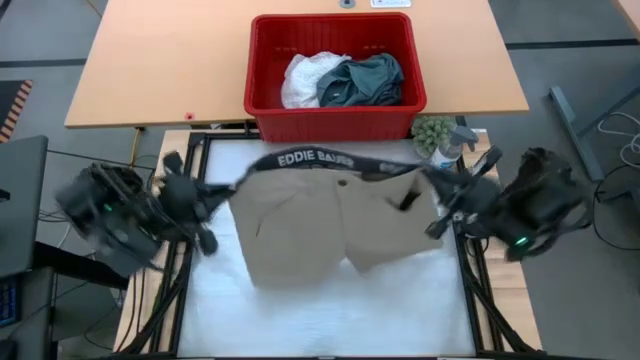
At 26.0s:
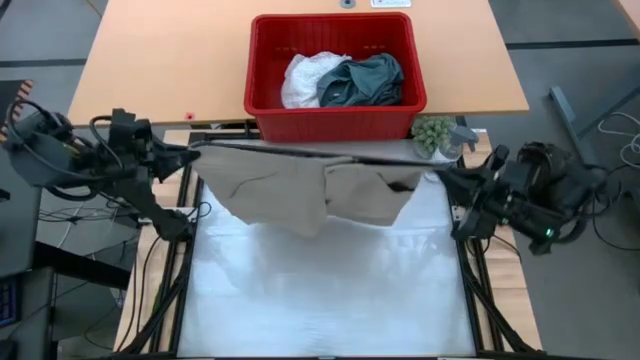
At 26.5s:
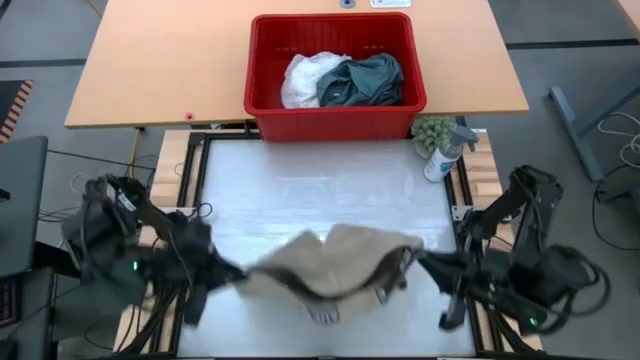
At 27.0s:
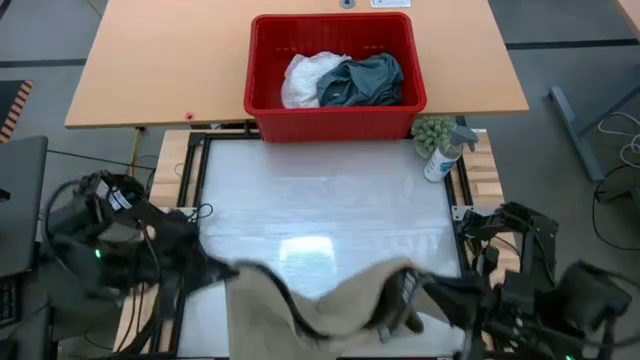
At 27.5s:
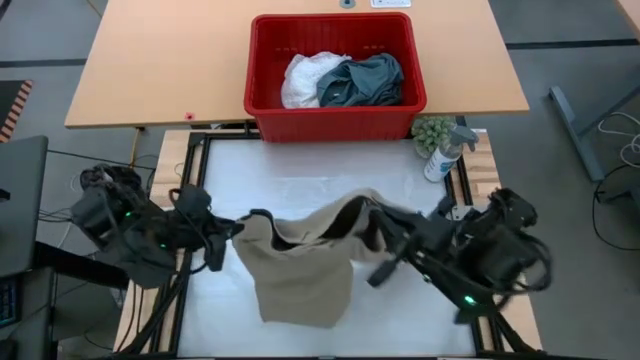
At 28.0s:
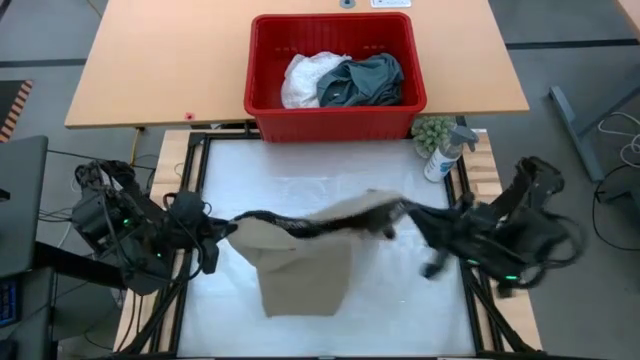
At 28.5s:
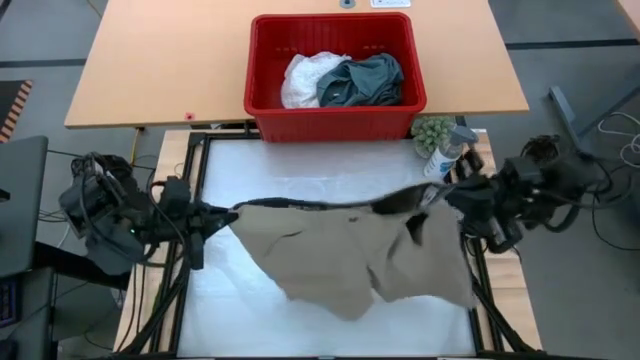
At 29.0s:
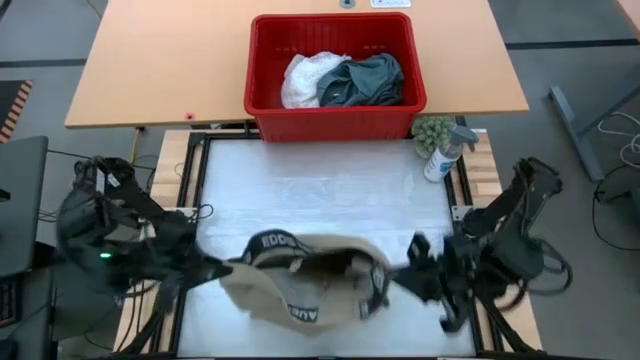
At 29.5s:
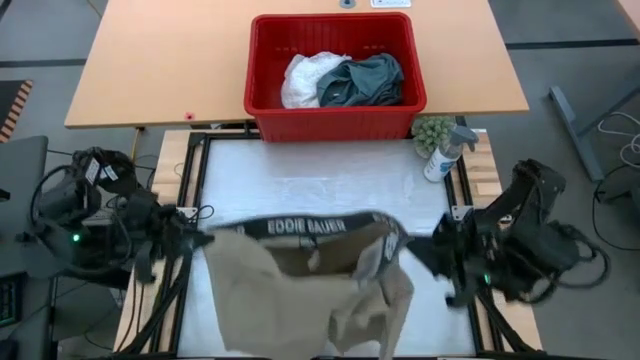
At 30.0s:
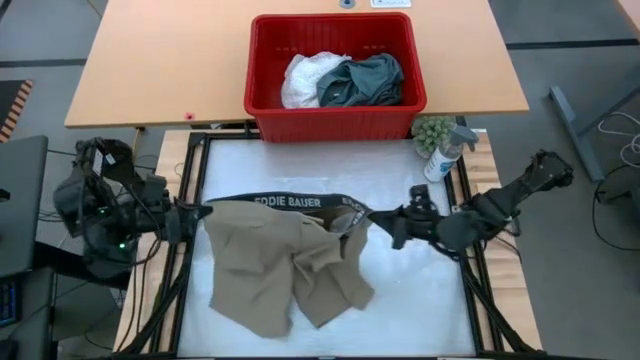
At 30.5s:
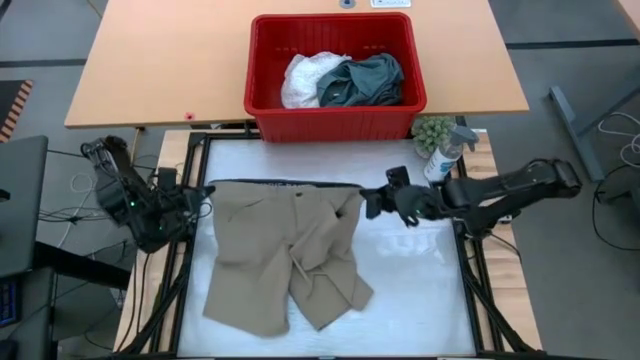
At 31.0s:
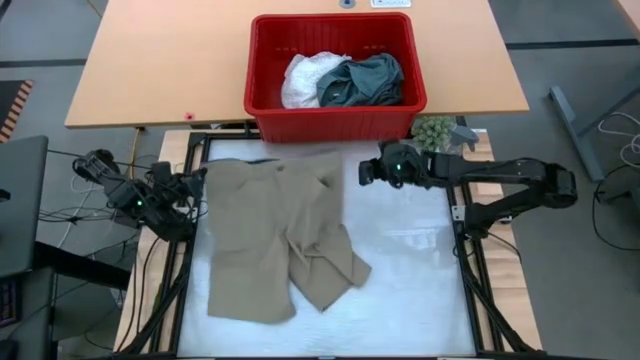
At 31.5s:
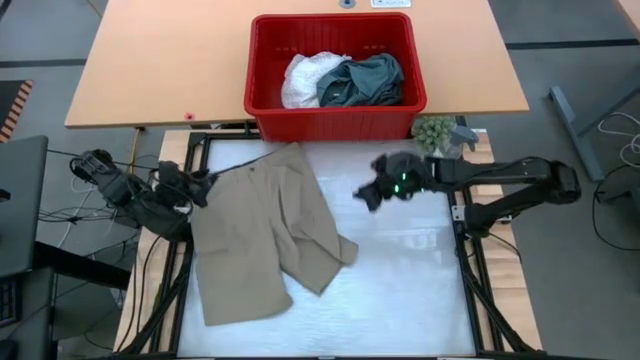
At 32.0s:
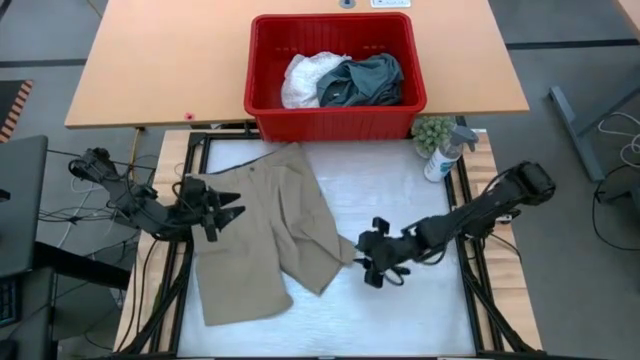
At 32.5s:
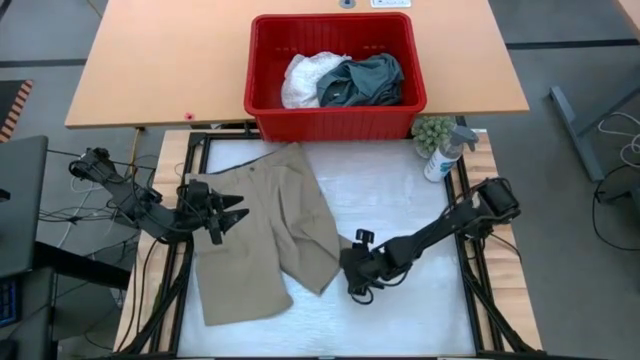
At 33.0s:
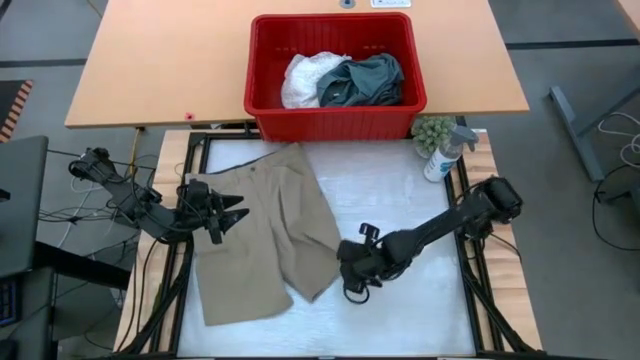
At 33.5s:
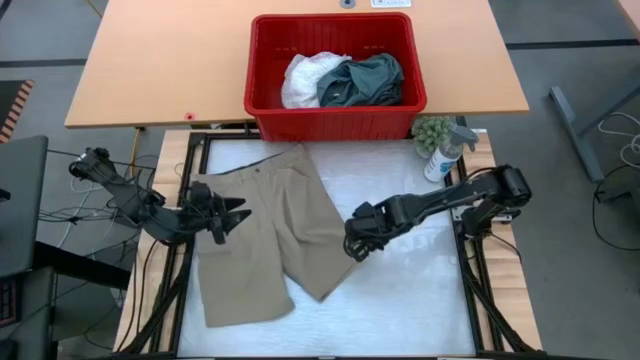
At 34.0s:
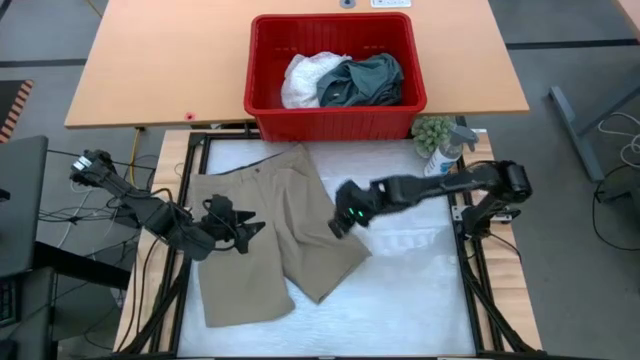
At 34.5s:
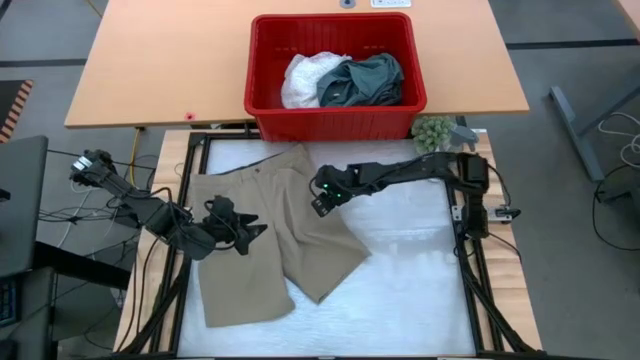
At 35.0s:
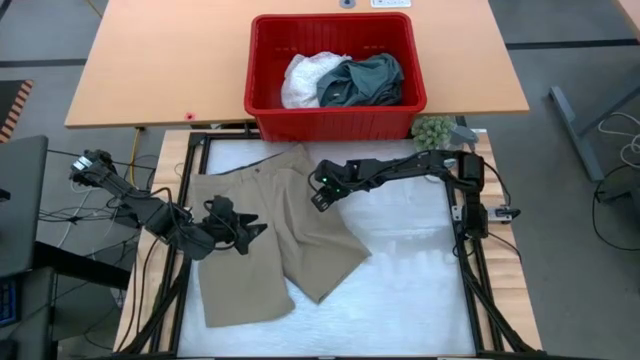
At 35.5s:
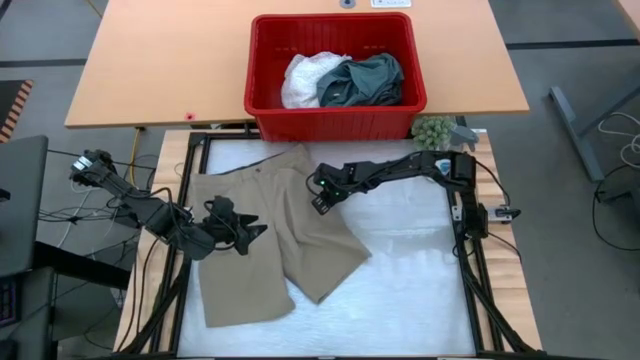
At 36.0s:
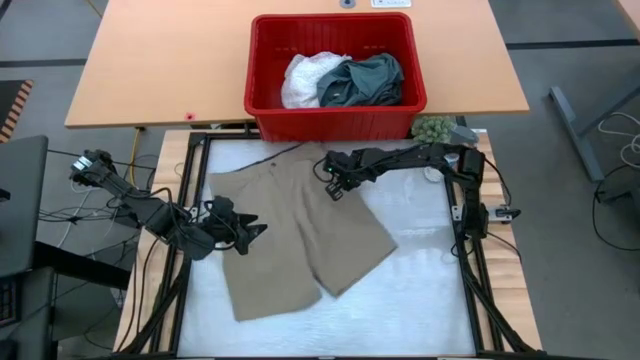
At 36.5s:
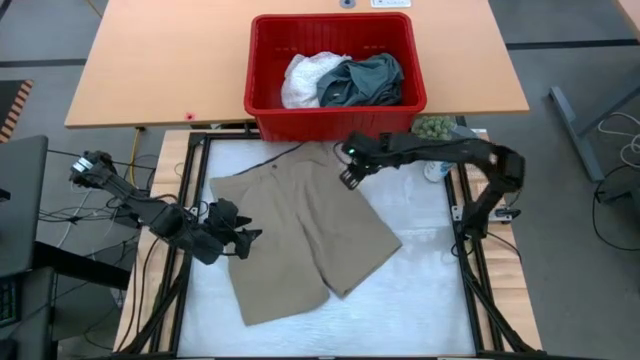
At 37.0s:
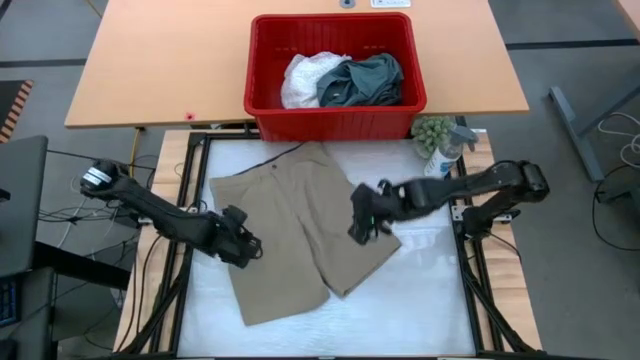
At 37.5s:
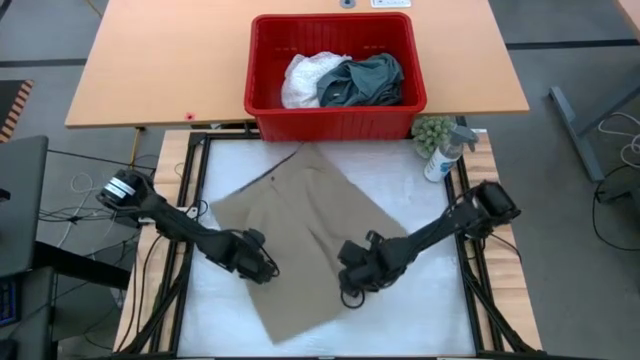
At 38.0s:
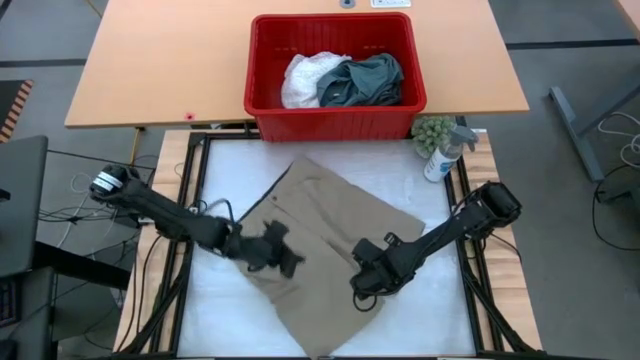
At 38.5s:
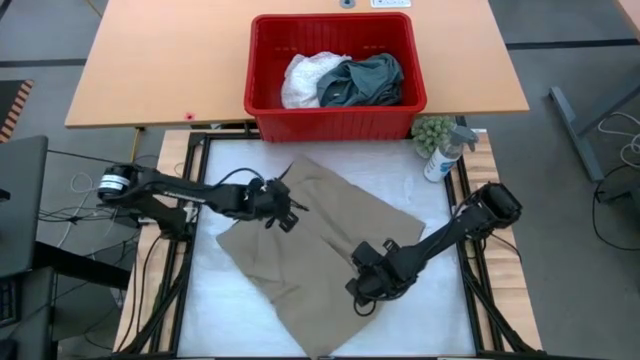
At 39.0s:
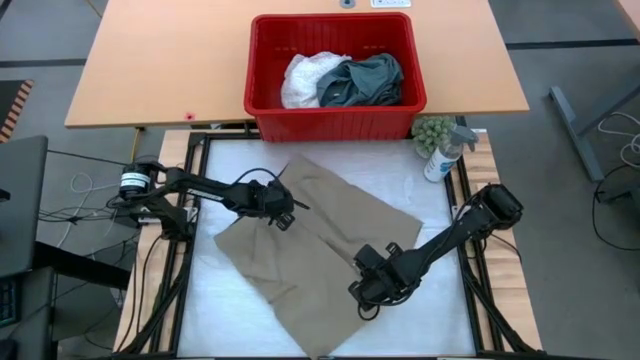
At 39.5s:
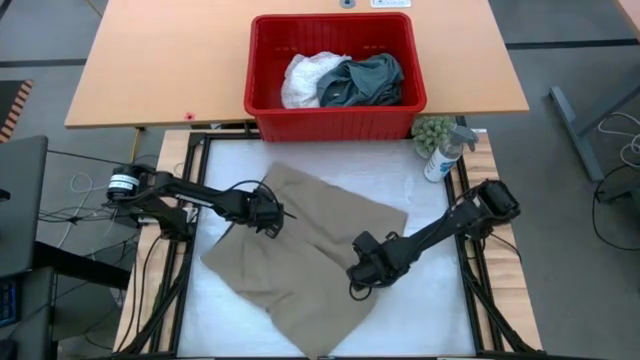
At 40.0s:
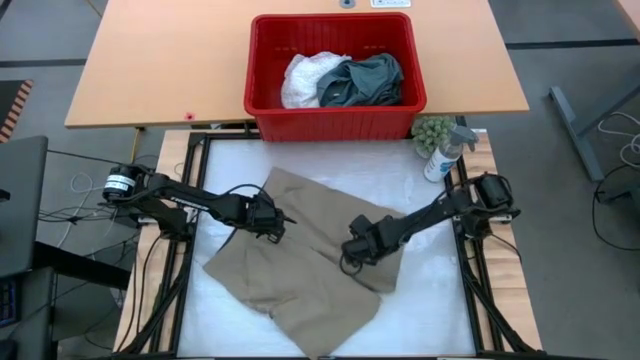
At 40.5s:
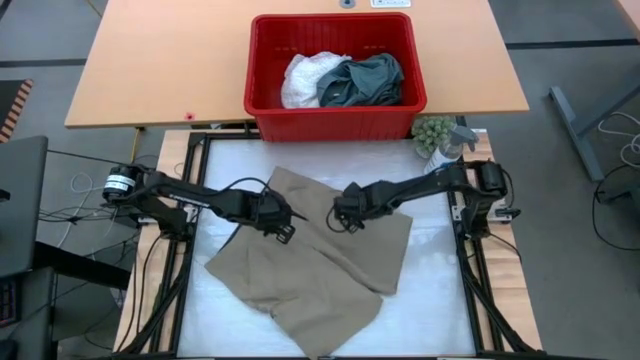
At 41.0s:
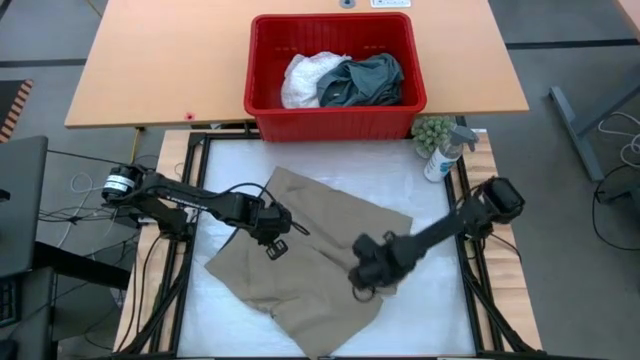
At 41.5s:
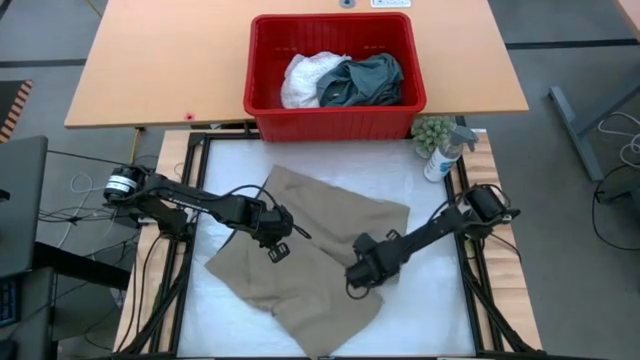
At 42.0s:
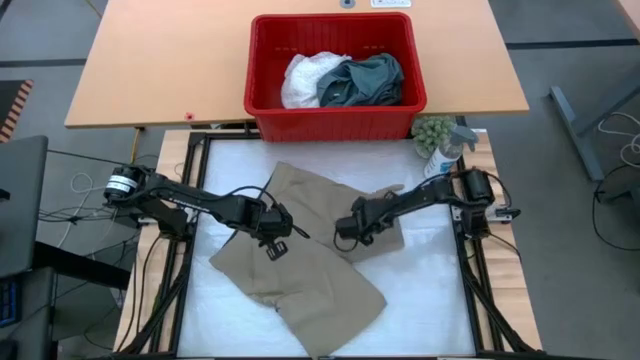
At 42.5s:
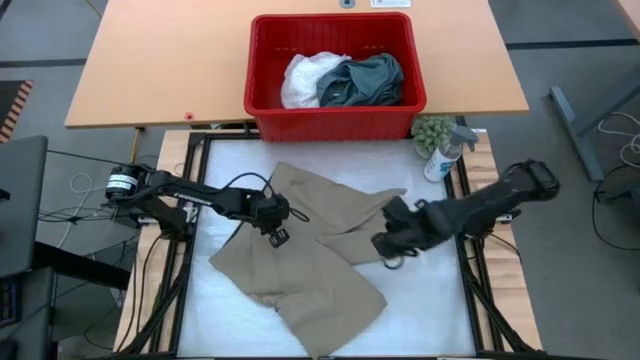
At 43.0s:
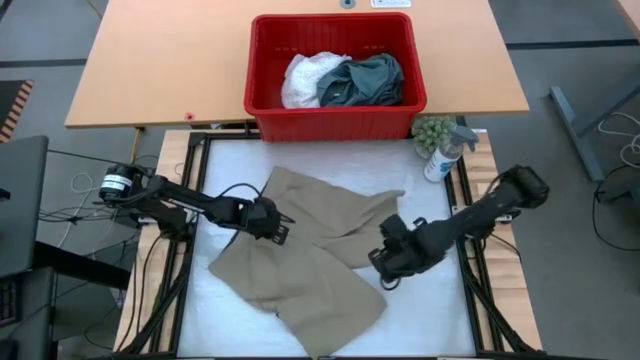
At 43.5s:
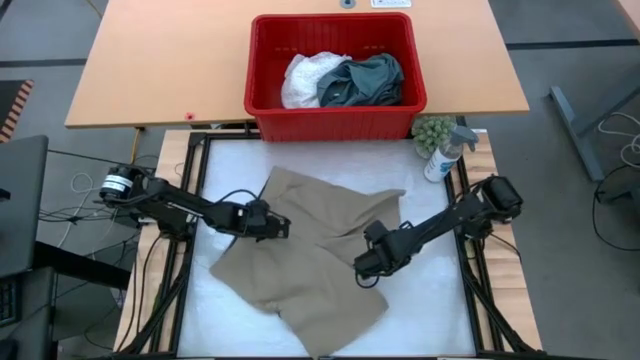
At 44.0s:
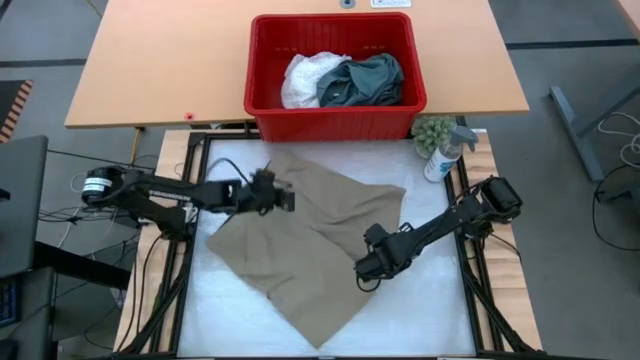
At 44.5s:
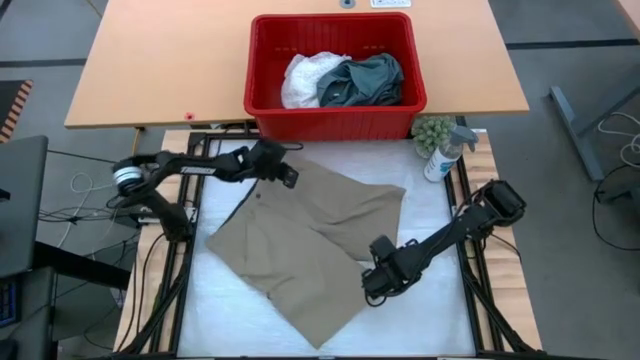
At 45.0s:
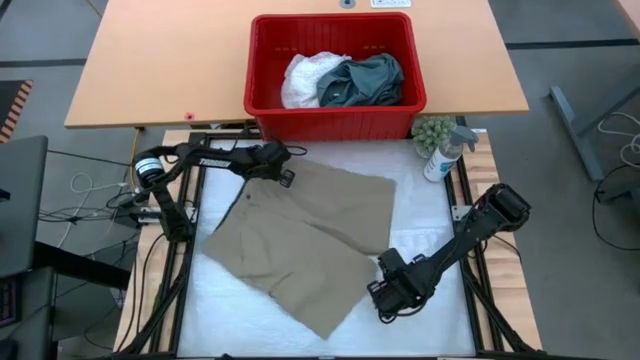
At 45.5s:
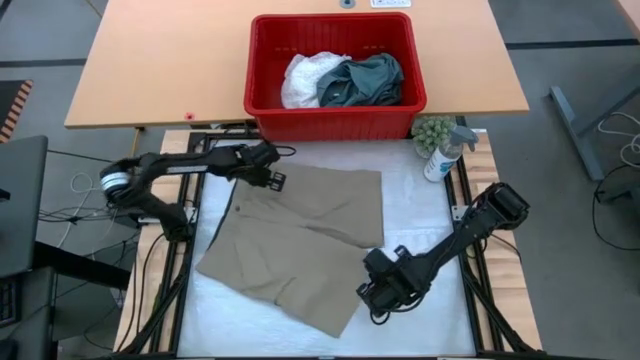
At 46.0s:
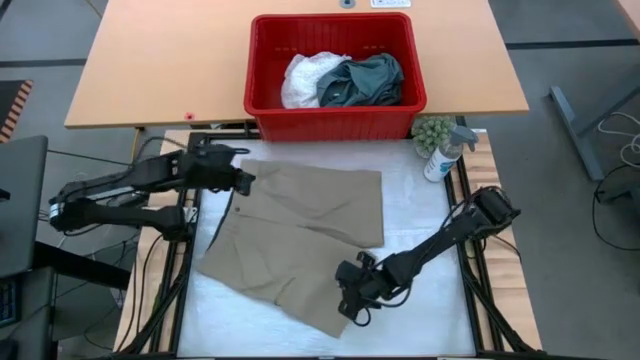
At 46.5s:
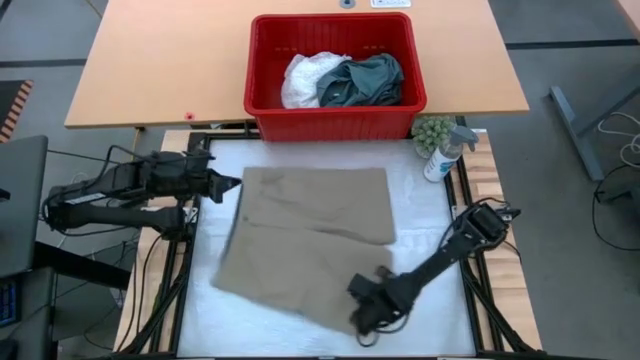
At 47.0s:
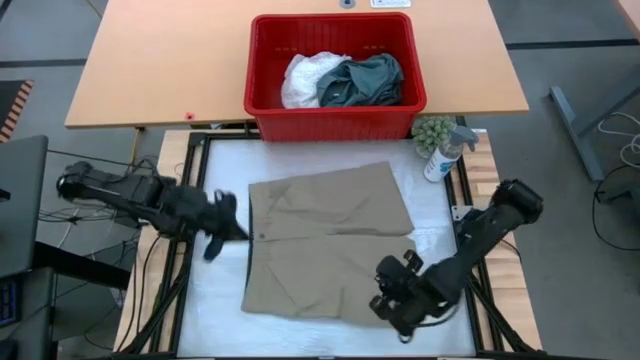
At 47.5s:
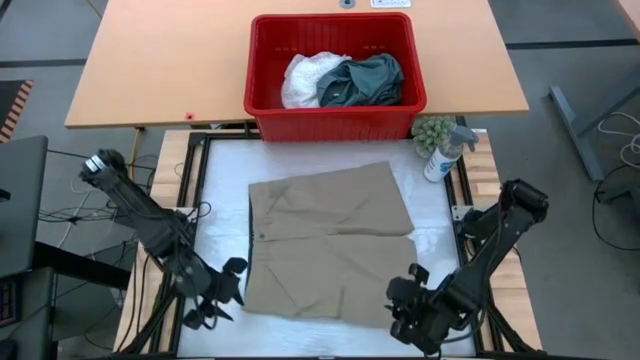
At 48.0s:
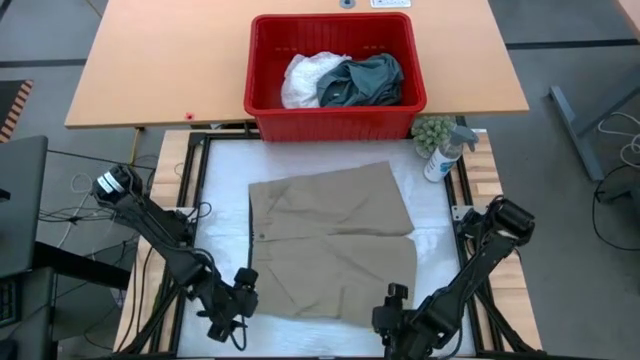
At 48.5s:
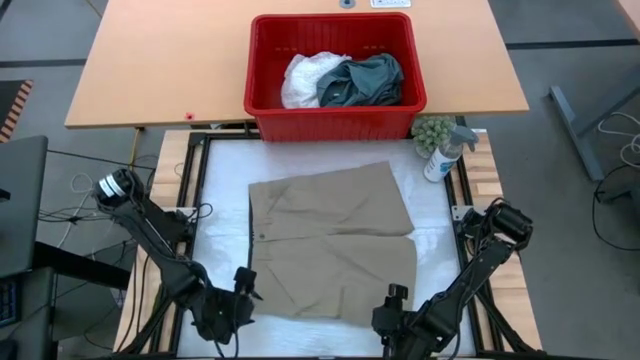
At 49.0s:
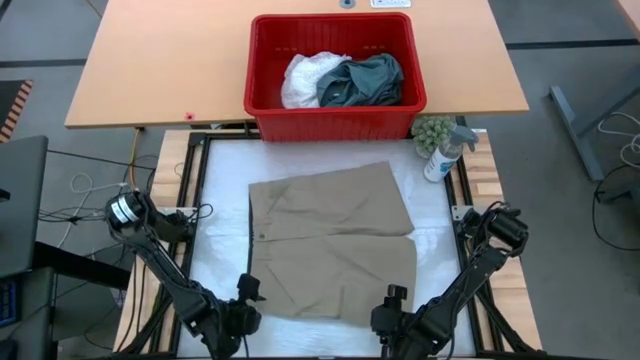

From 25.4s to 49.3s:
Task: Fold Laundry from Bin
Fold the brown short pants in the red bin
